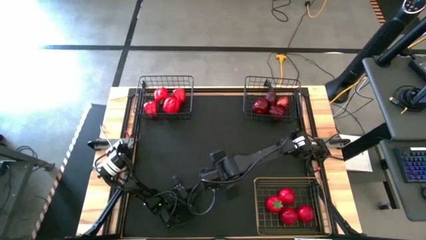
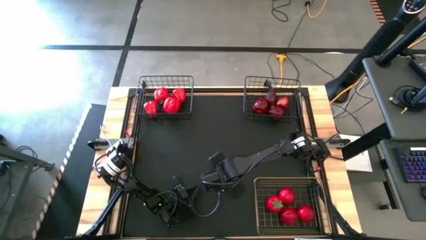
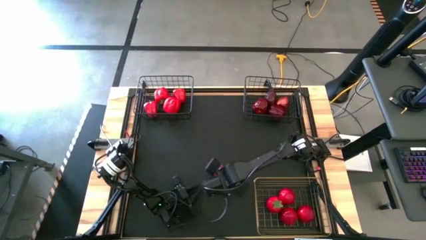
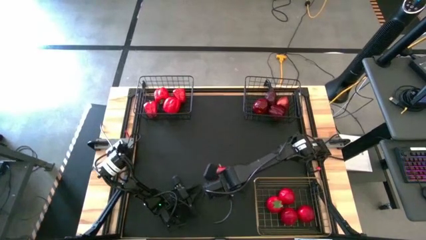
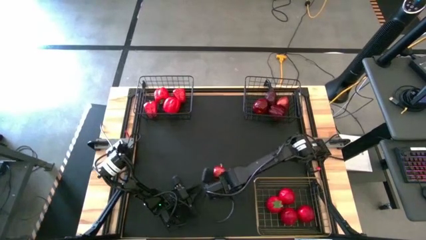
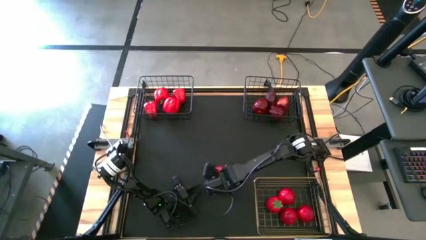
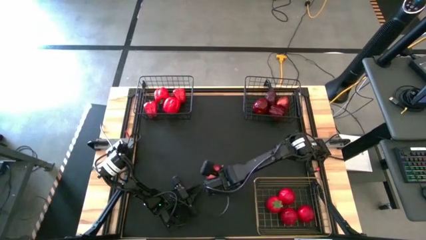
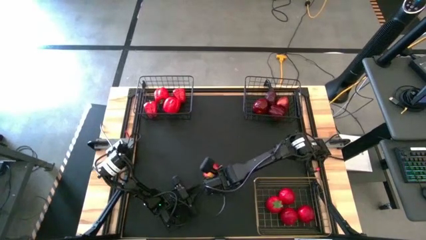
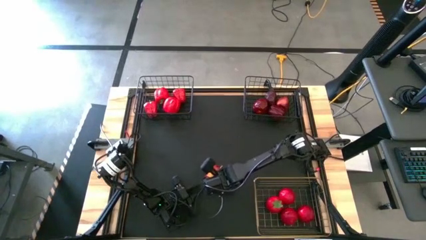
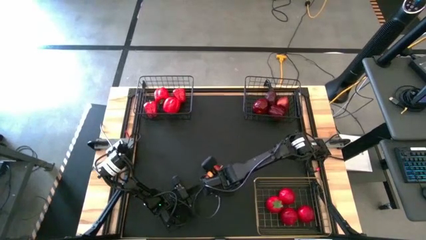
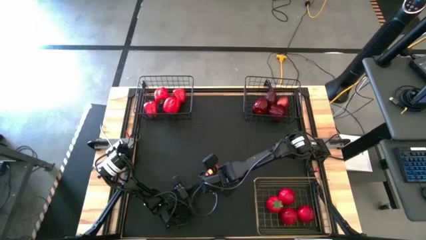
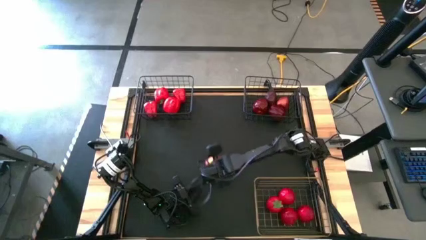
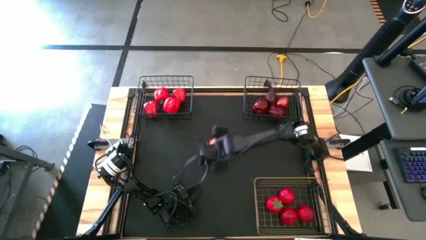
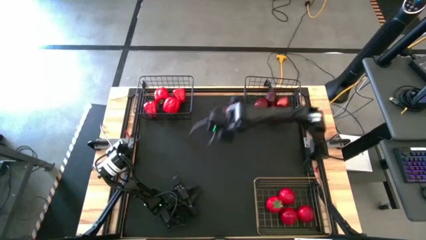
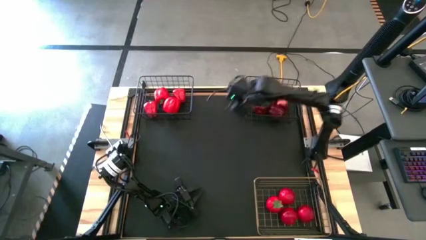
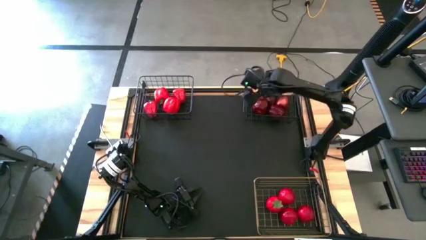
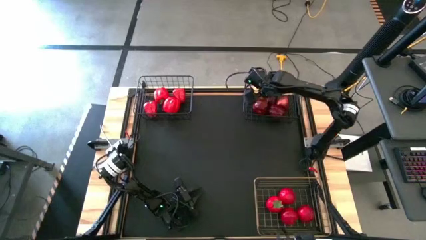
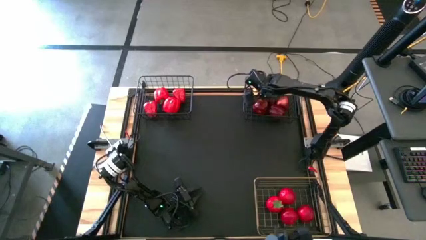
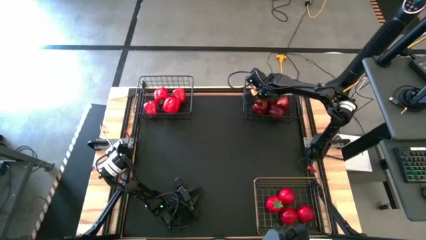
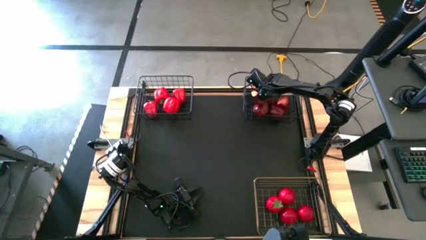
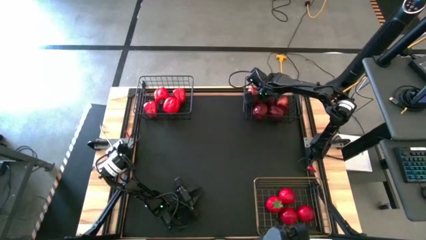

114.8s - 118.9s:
Task: Sort produce into baskets
Put the apple into the right black wire basket

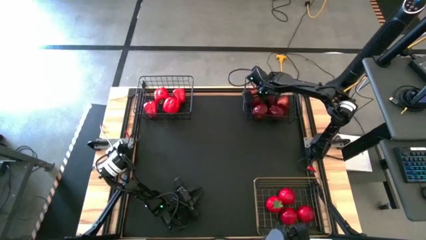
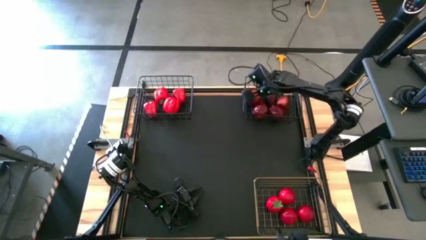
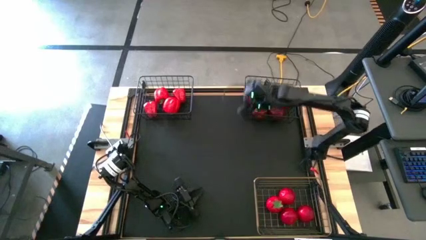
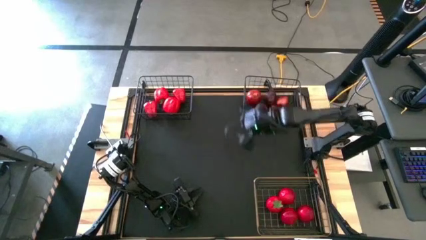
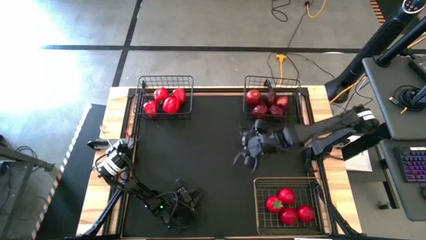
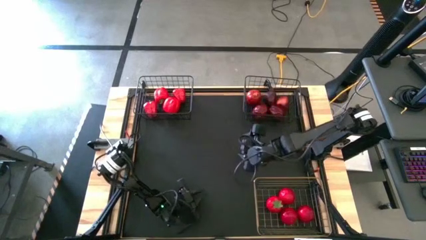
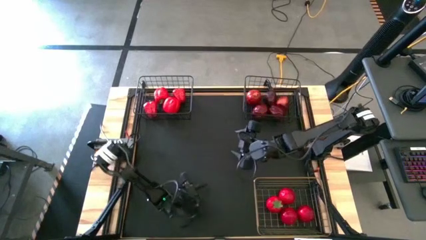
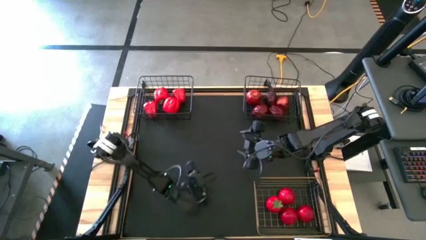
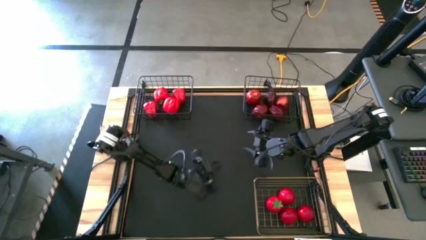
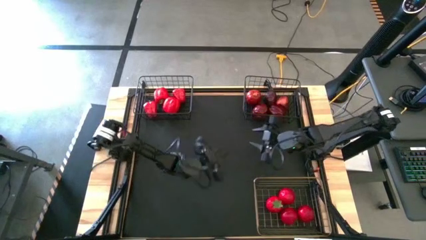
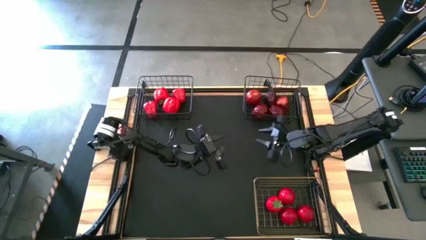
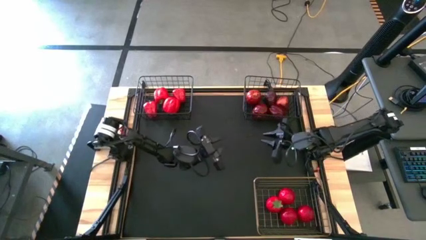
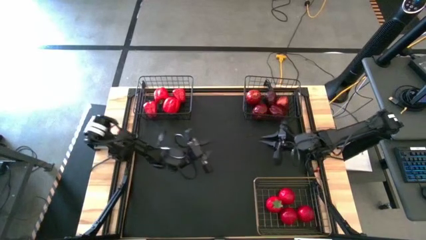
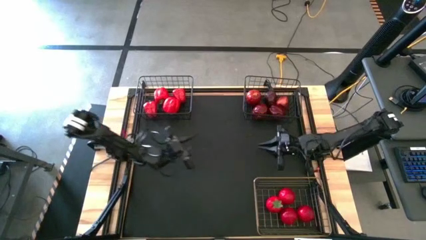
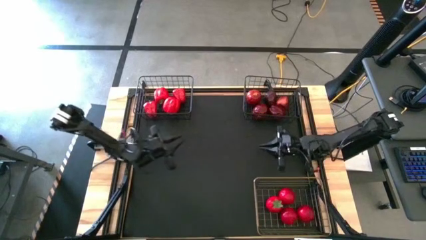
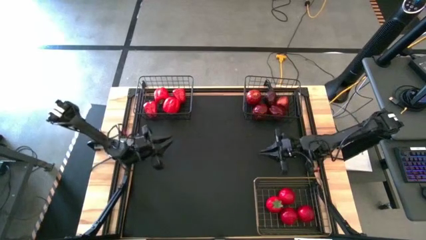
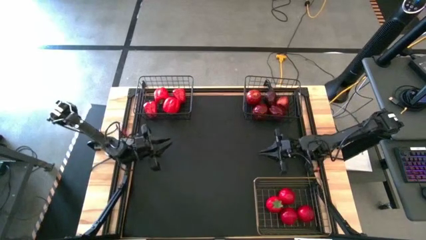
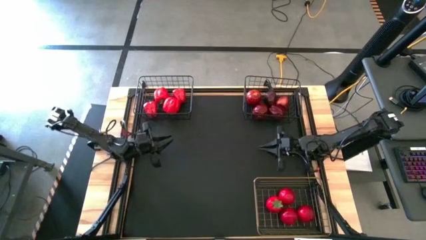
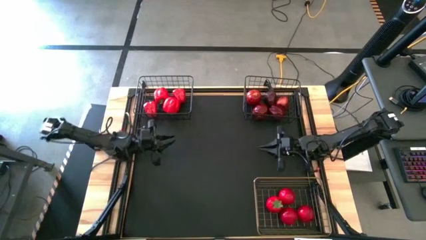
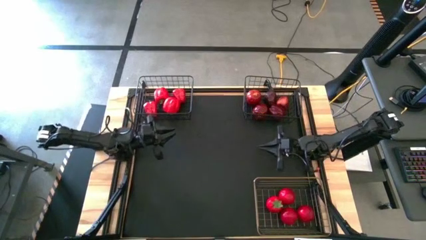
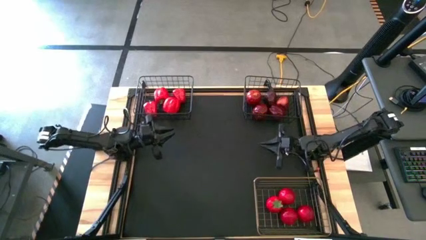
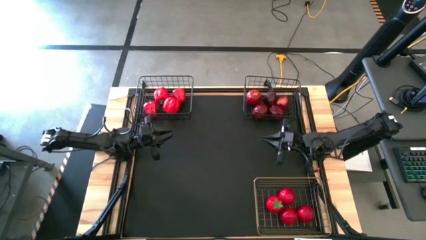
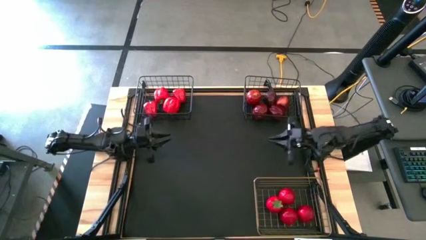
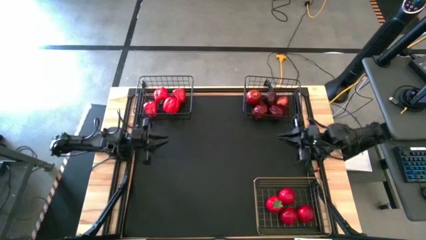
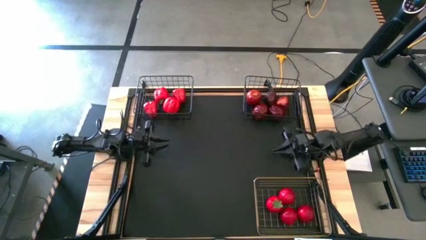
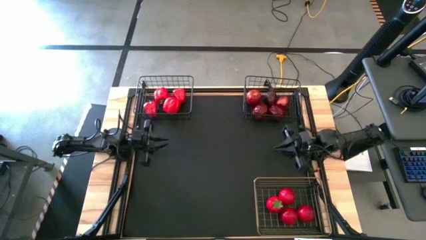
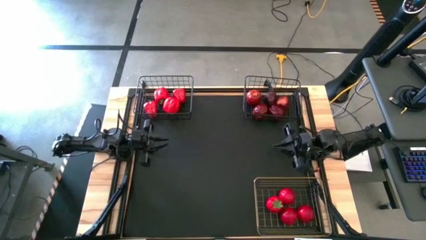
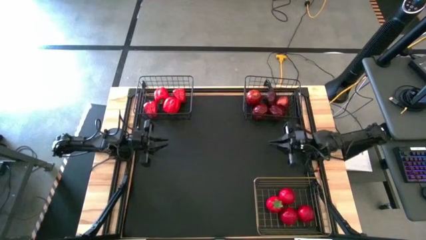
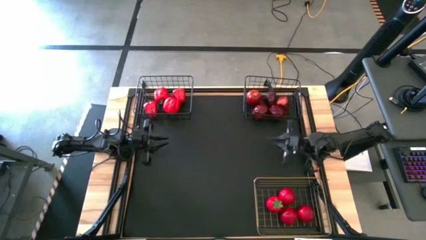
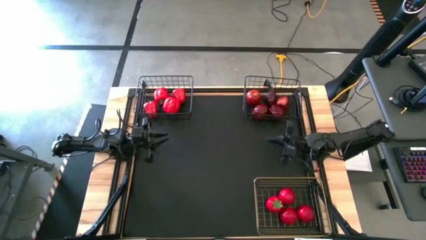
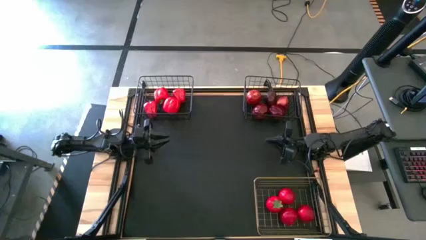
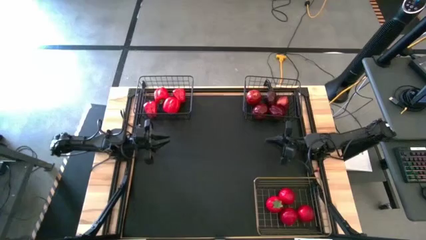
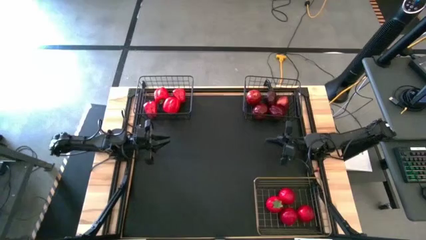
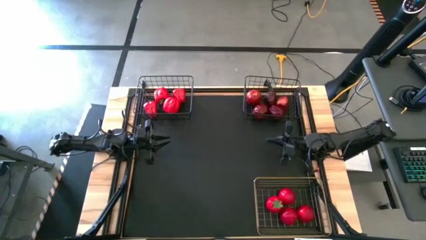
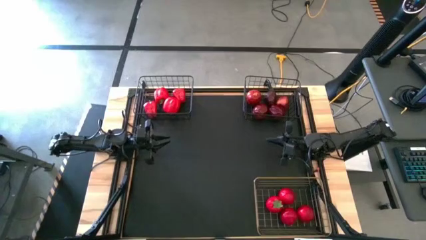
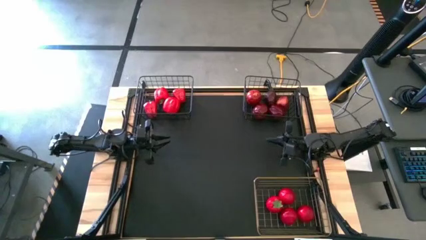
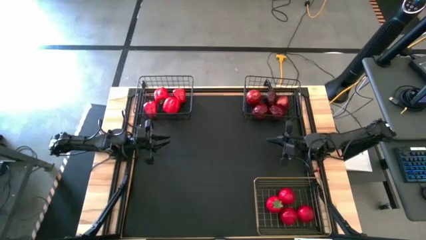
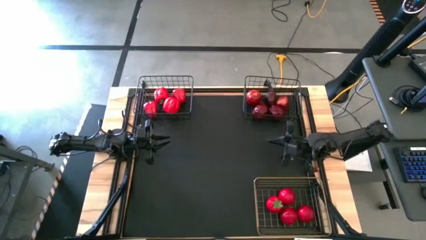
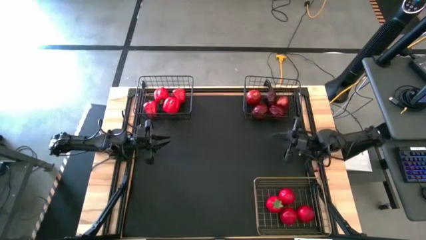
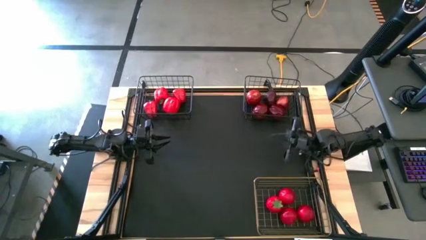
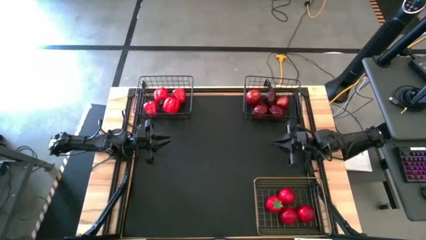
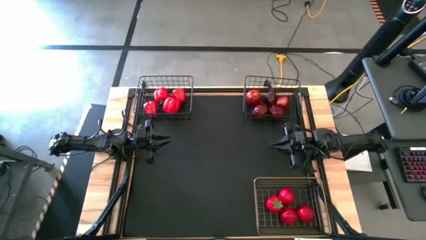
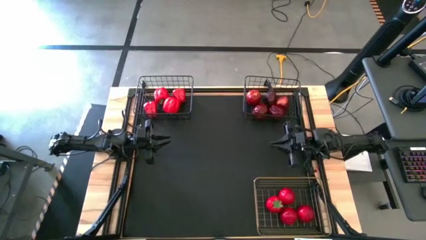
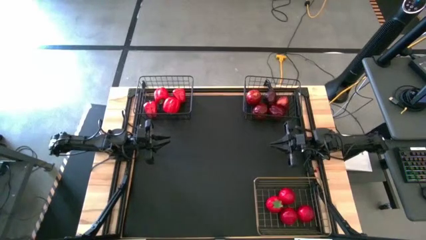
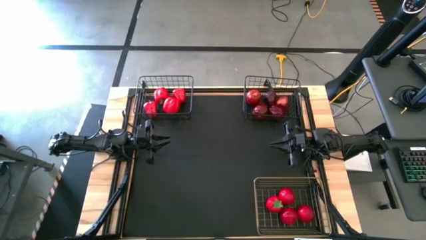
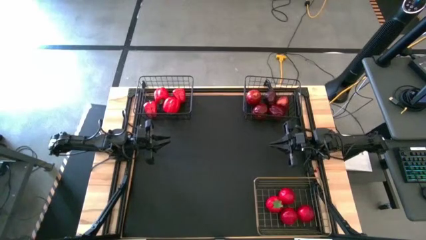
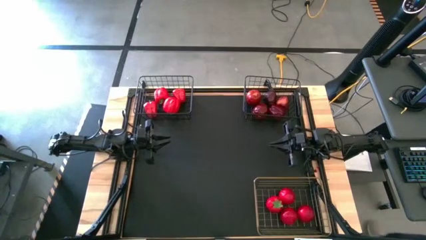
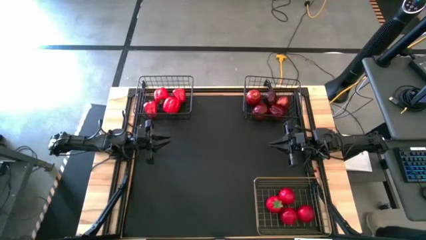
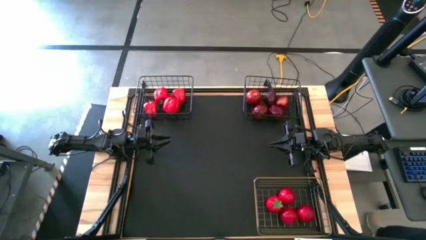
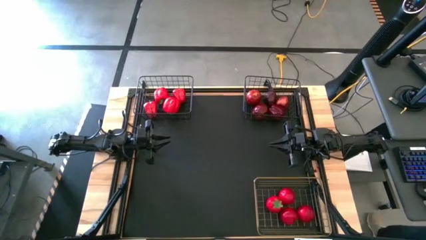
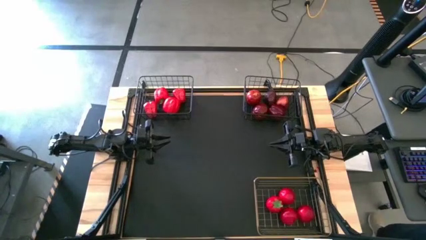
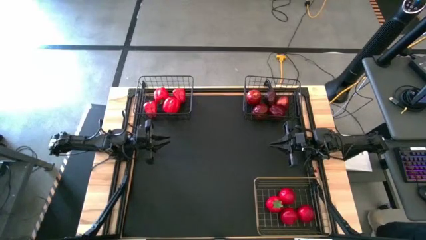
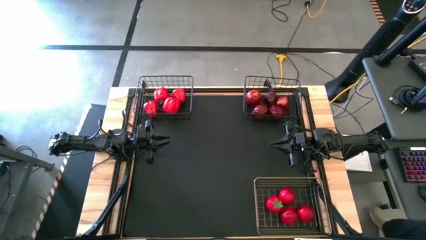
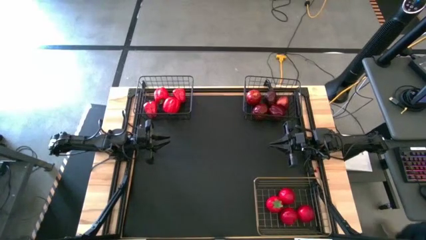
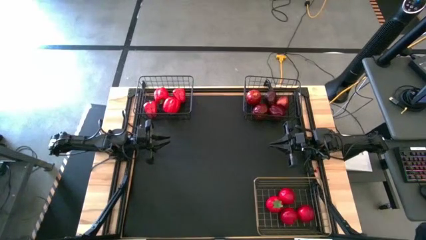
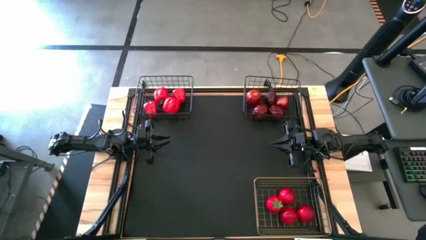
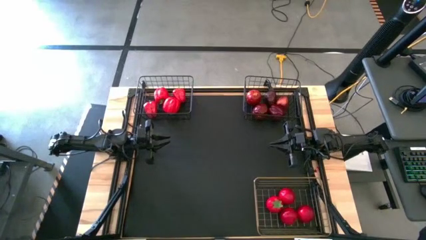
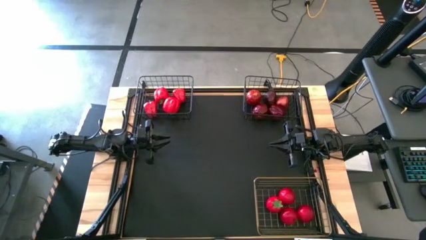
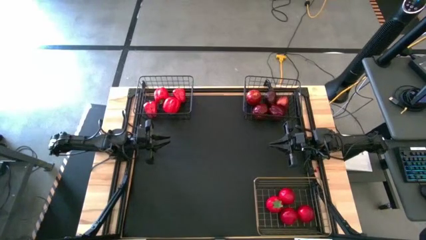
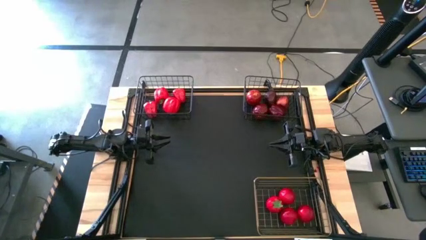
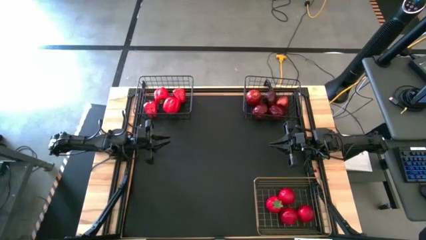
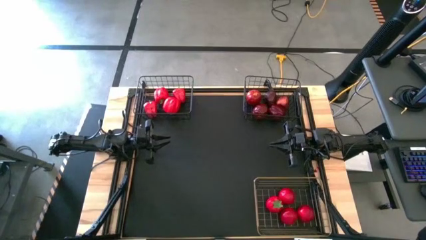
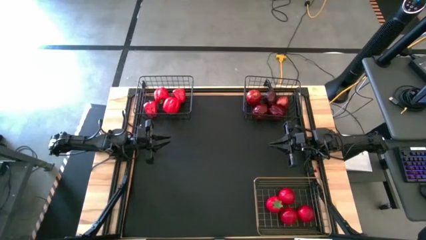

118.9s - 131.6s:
Return to Home Position
